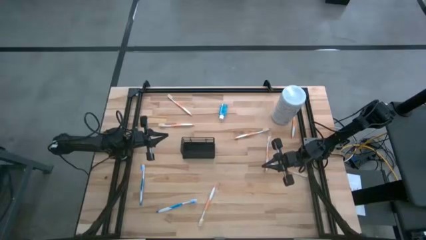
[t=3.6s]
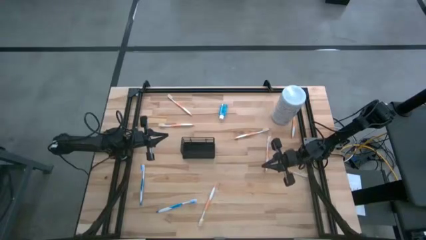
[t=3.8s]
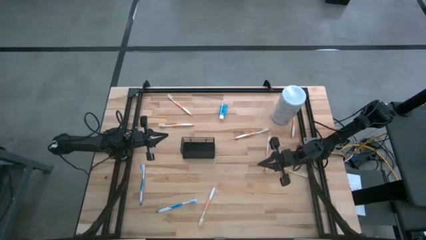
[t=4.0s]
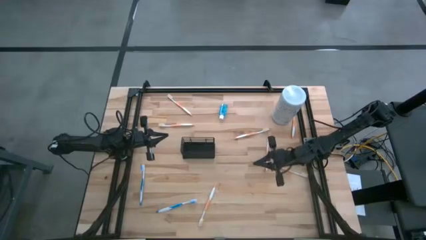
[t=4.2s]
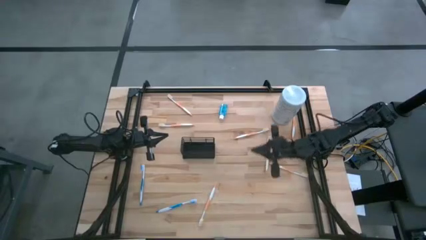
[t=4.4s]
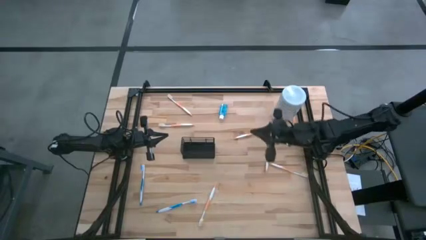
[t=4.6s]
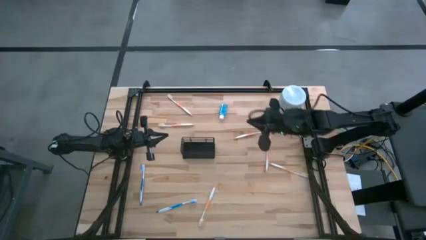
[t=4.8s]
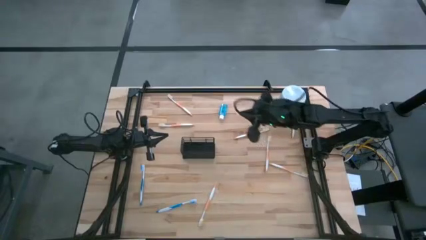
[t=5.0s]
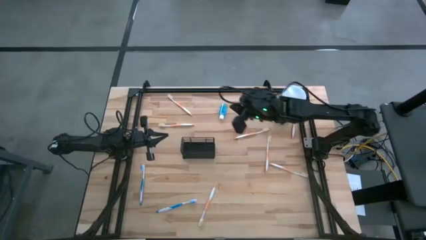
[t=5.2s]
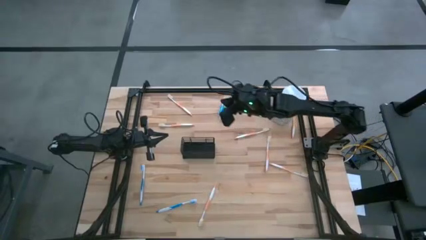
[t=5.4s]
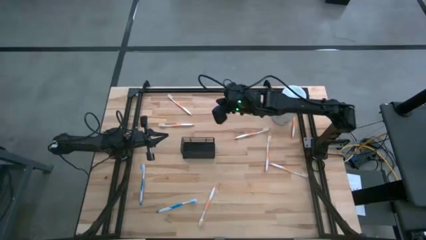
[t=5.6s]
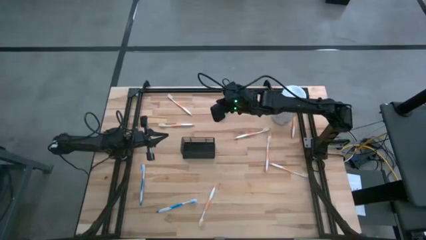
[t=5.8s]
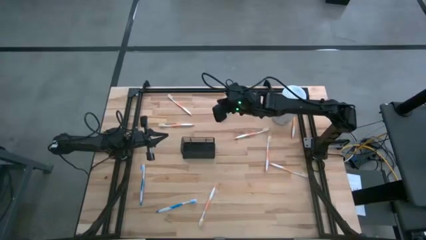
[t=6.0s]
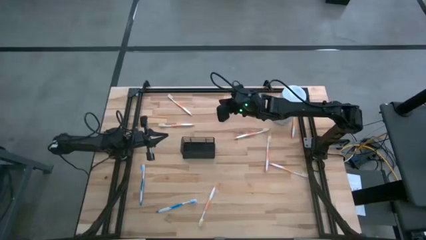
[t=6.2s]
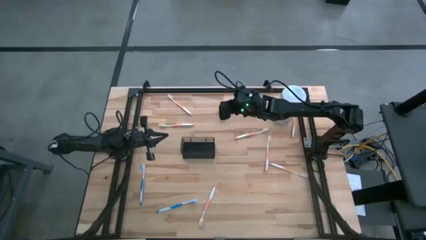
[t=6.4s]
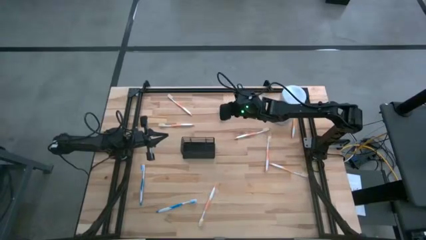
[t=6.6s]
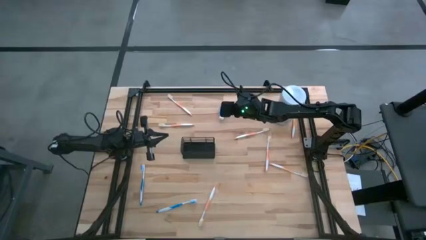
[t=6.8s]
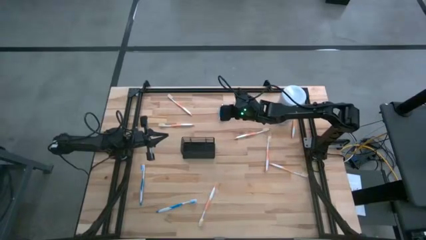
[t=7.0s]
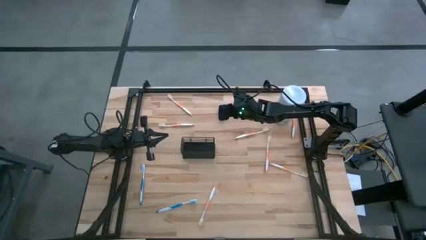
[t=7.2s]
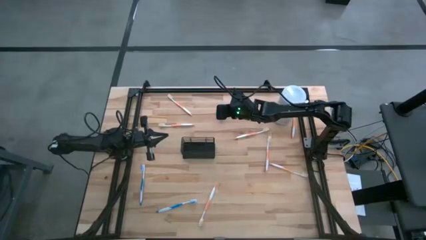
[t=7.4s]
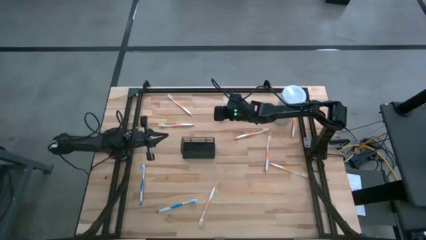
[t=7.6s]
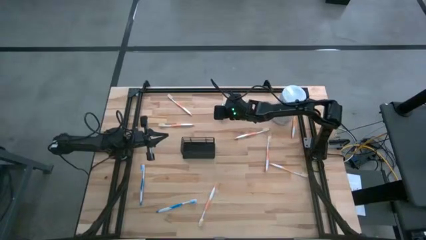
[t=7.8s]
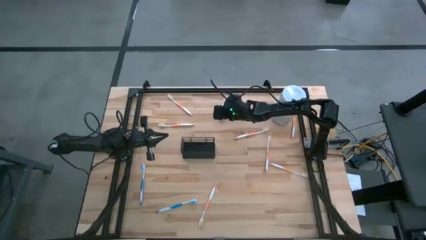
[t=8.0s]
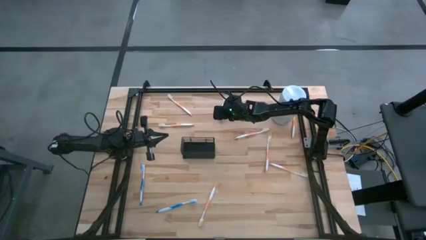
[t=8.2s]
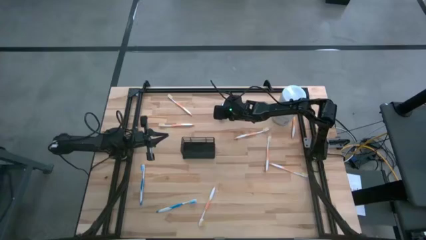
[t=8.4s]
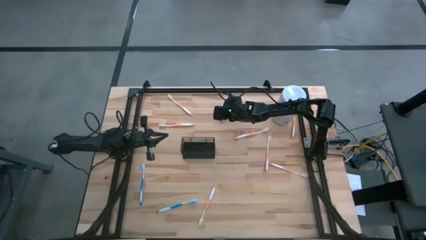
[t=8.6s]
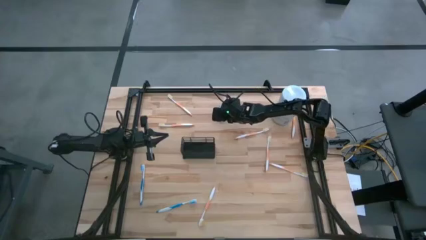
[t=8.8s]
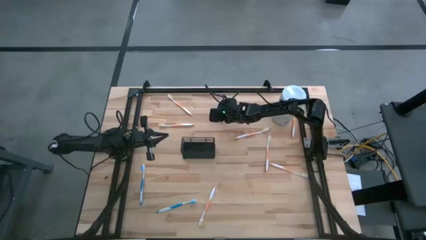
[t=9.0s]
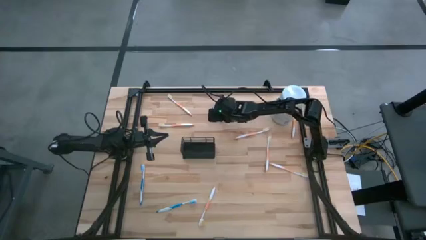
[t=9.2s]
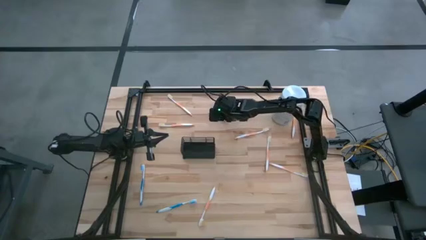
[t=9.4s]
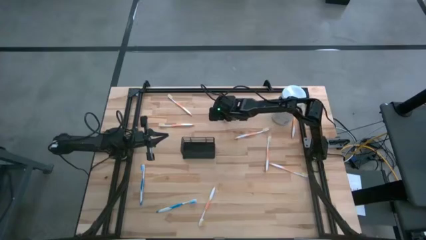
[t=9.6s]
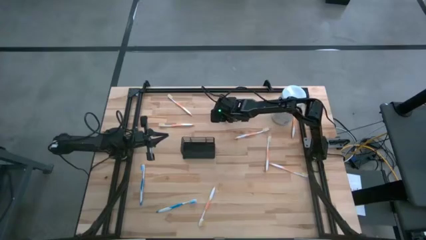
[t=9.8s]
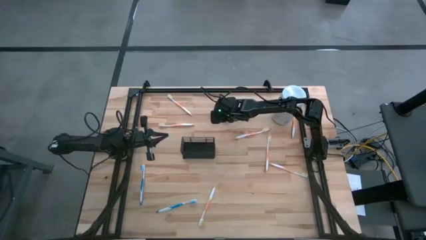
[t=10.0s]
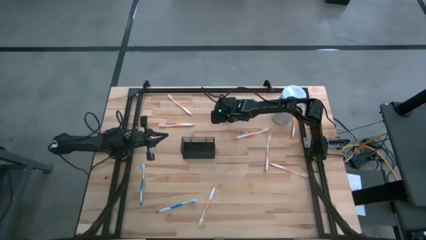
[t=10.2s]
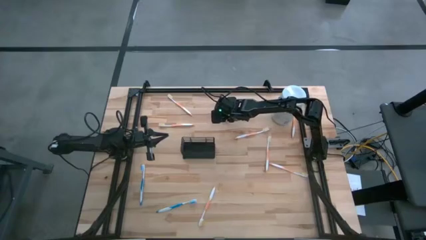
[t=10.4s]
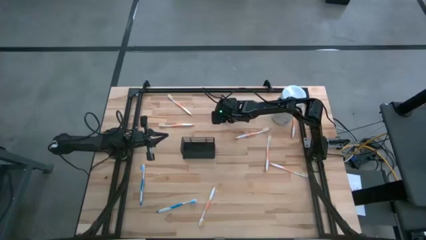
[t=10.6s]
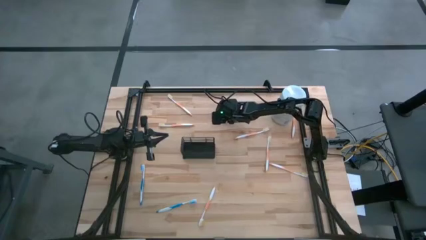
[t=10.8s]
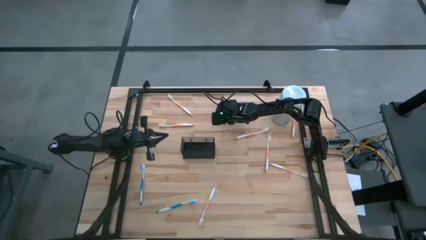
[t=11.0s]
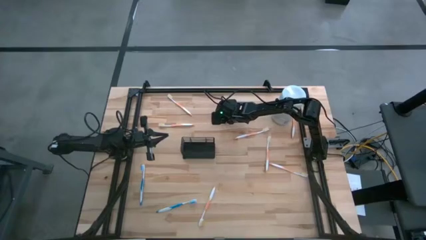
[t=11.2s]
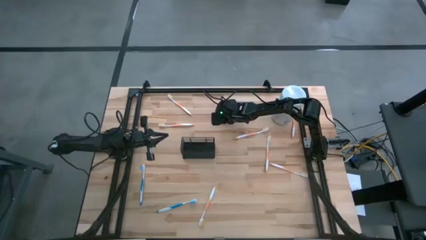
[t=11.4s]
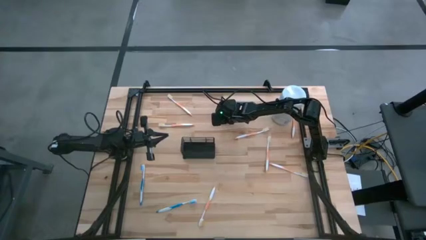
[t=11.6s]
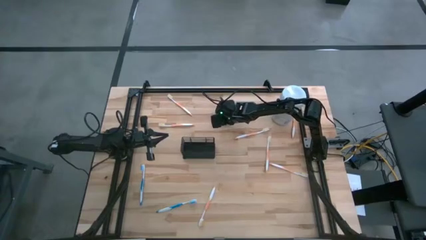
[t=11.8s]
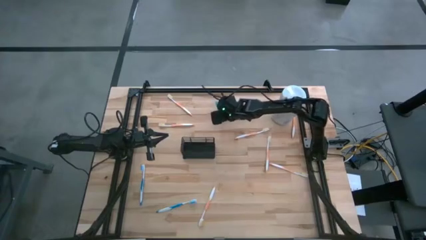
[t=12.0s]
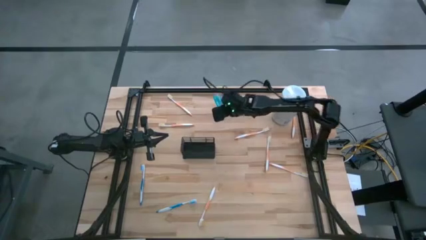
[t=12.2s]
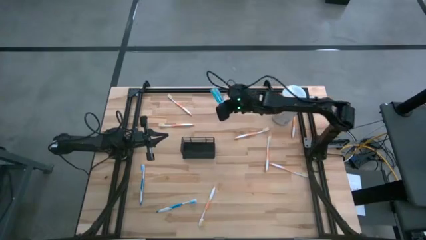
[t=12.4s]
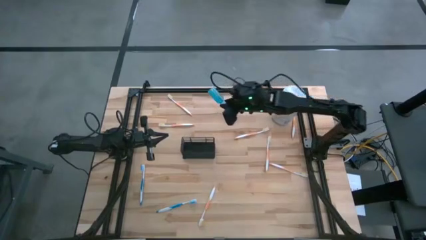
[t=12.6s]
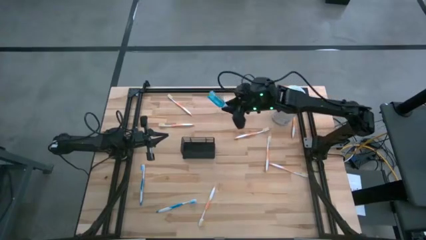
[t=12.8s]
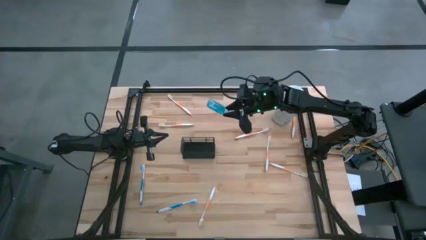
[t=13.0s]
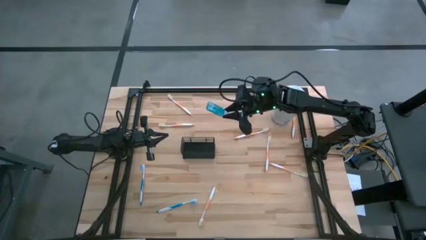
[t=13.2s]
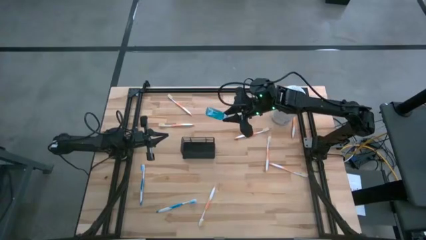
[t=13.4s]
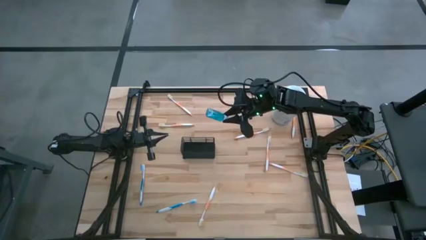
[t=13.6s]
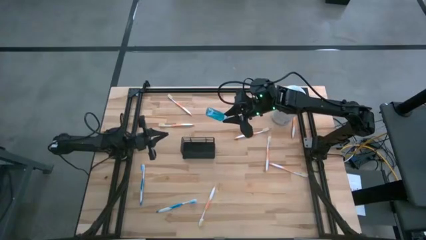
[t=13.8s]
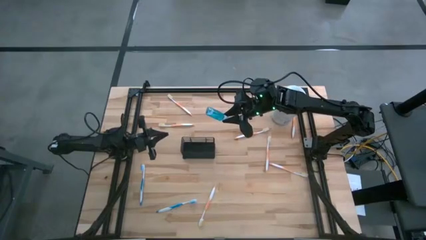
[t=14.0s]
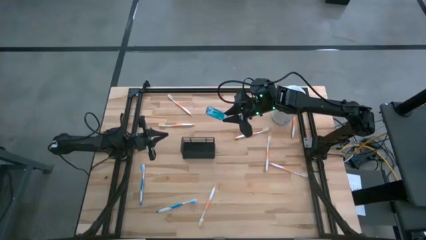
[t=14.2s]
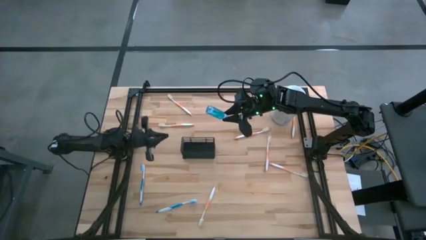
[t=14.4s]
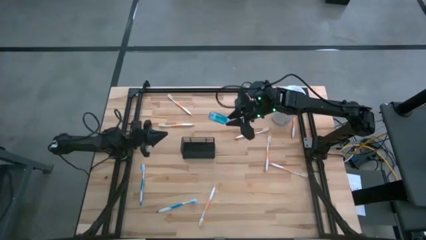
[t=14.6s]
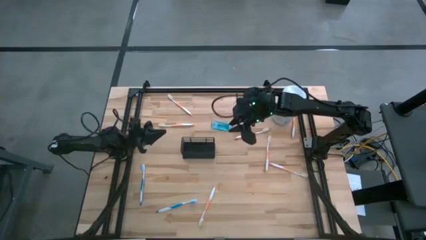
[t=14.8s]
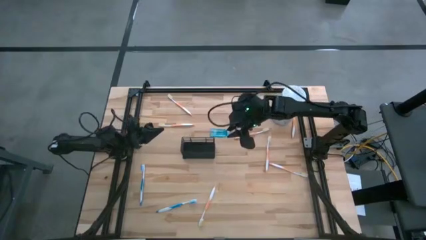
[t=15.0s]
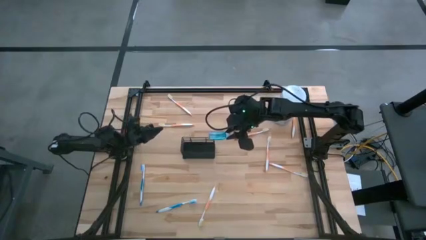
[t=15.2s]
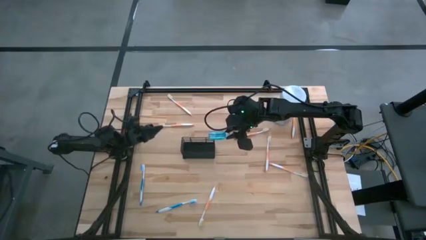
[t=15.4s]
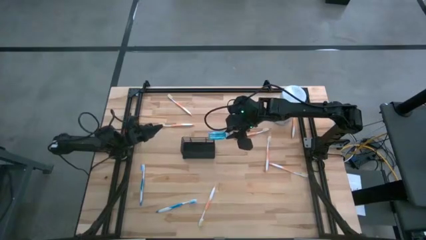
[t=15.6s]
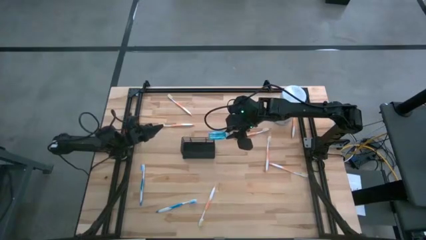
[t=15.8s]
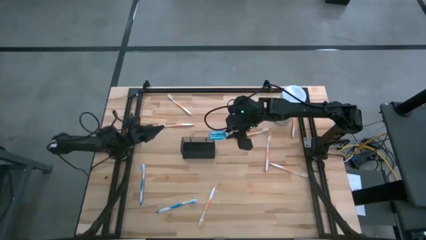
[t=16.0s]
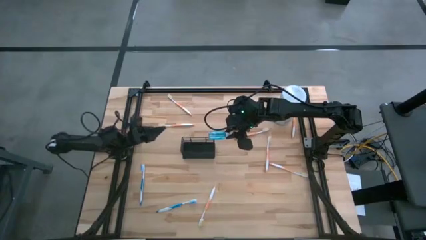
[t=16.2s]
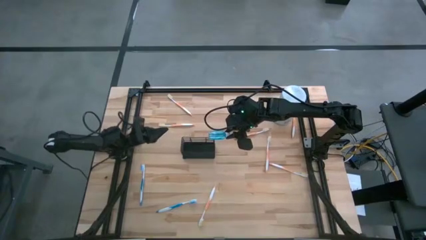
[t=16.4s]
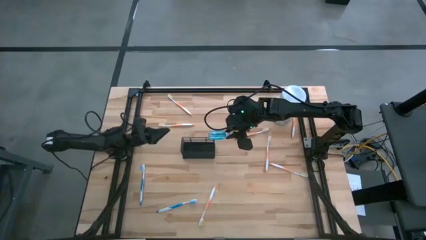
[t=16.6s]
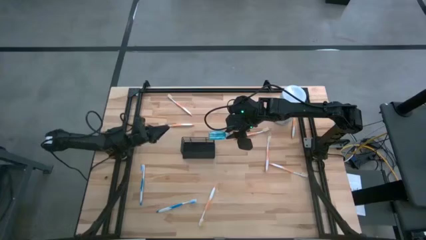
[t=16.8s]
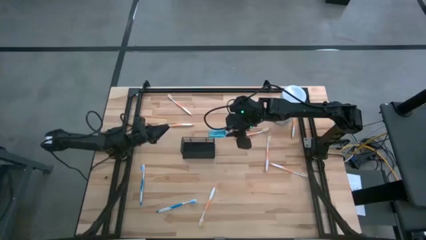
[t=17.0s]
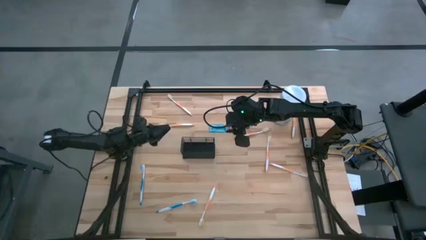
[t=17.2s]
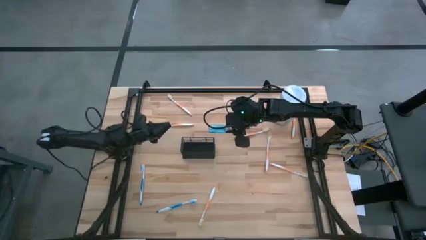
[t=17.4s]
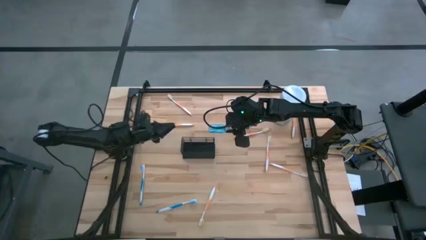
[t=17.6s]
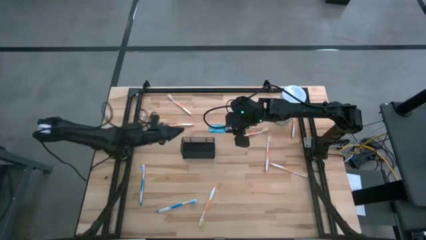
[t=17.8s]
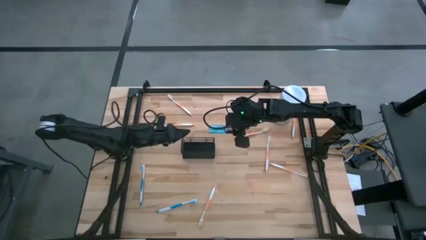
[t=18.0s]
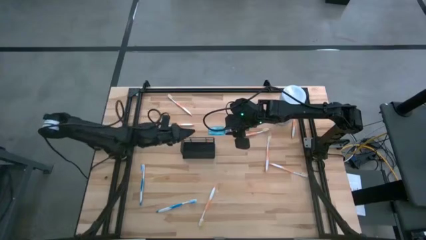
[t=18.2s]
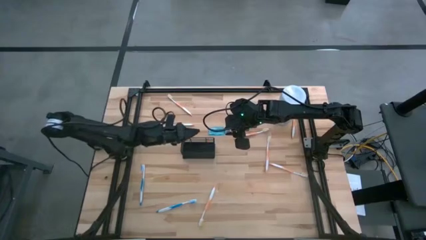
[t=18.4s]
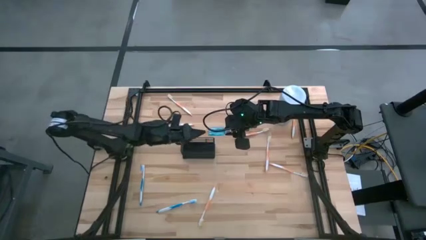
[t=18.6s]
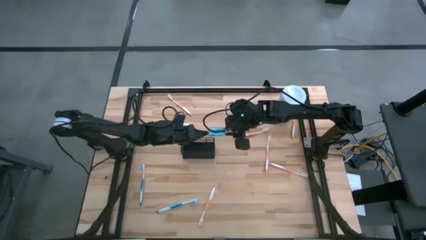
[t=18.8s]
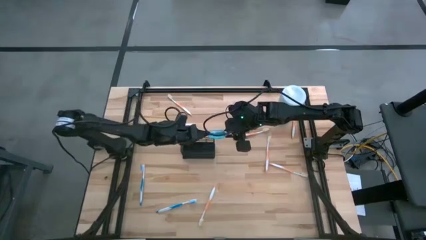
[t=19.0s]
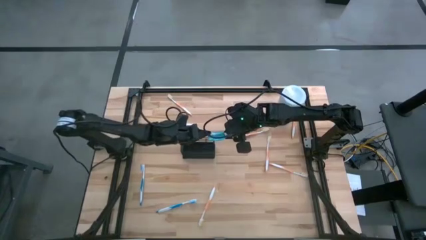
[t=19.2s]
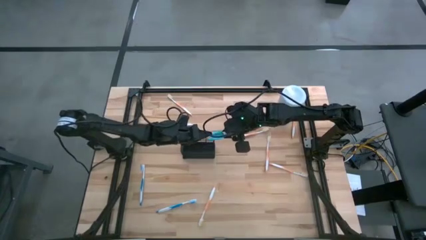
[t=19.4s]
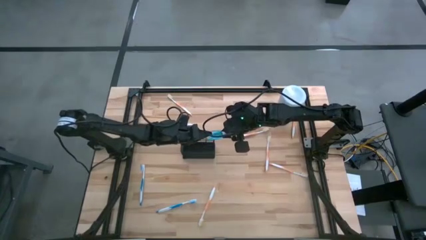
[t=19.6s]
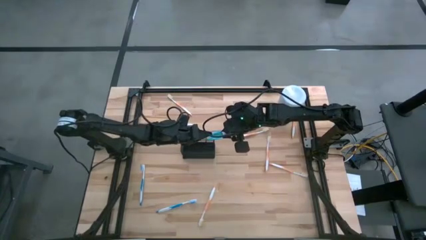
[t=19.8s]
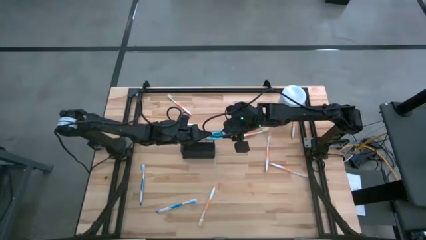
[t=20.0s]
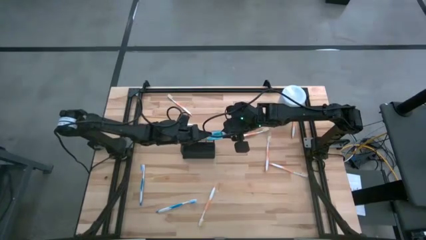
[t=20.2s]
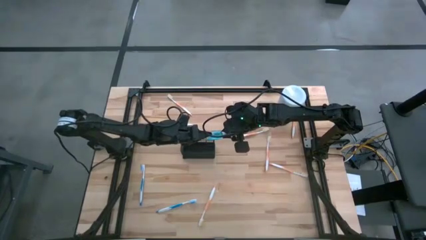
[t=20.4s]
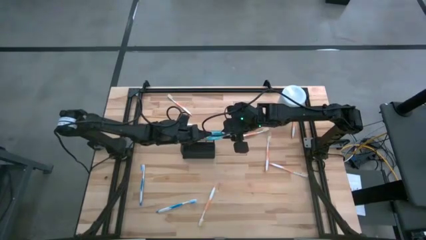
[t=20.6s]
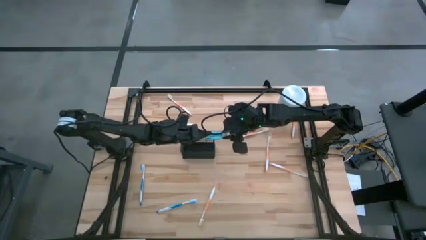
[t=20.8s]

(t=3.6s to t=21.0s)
Task: Pick & Place toothbrushing station
Put the blue mouthwash into the middle section of the wire organizer
